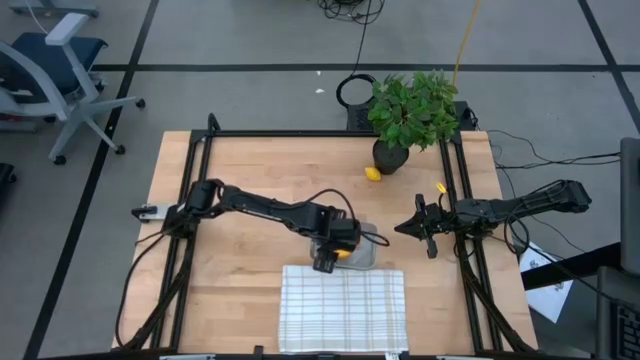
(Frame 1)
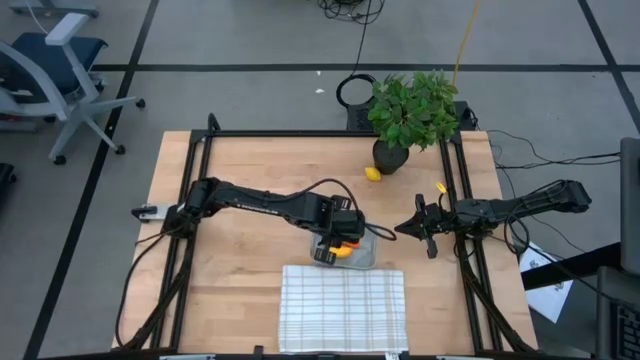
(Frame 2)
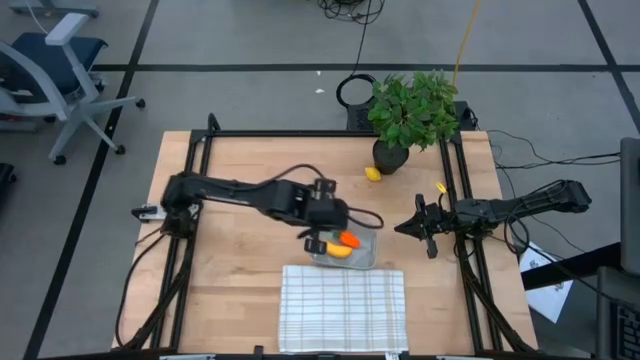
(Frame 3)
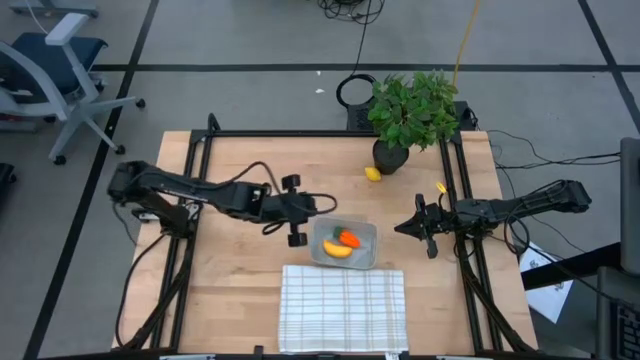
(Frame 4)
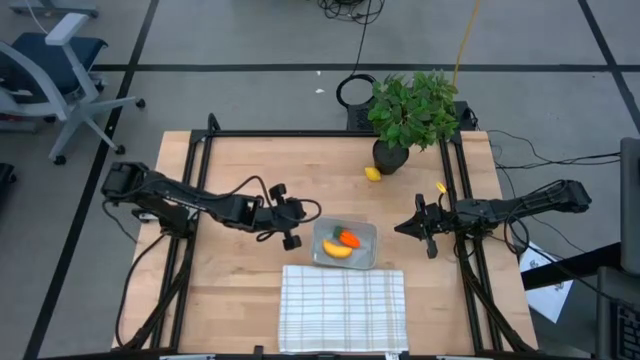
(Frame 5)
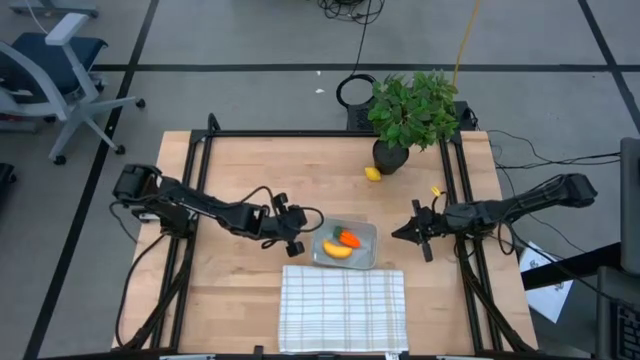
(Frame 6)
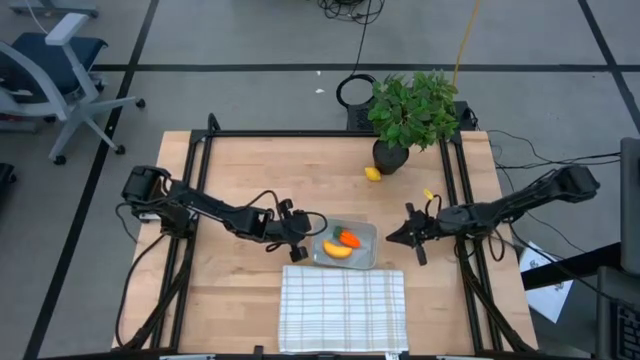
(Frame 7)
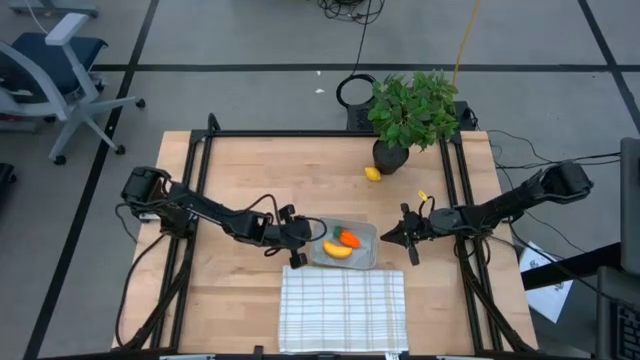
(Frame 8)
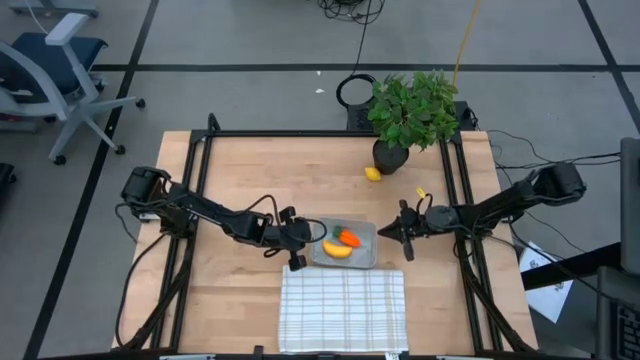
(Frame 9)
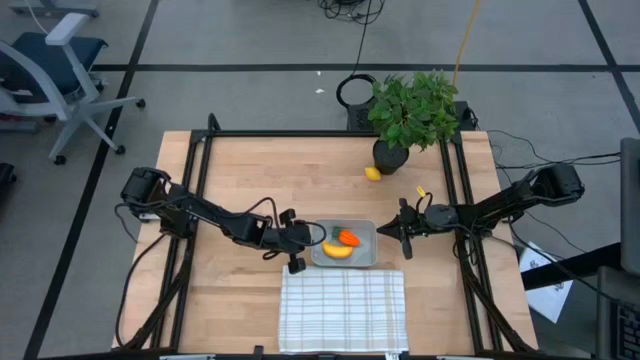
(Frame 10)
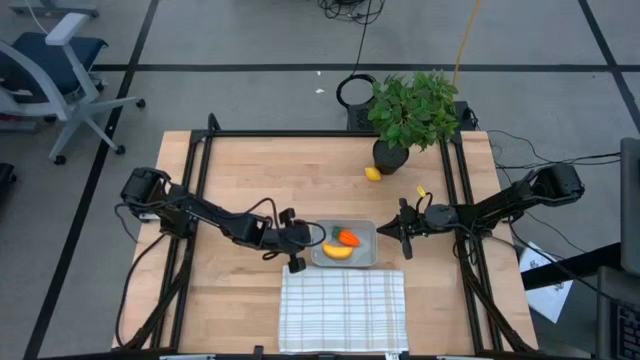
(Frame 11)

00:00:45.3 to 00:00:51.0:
Task: Pick and placing Produce into tupperware
Adjust the gray bin

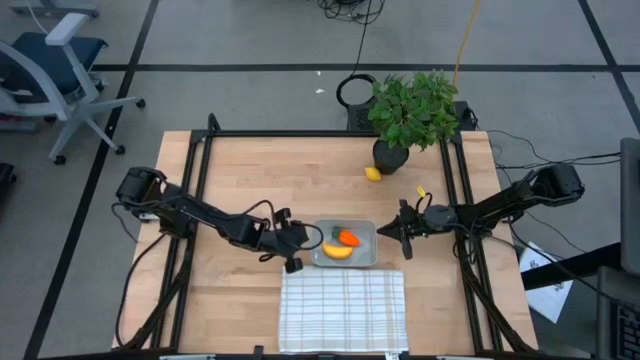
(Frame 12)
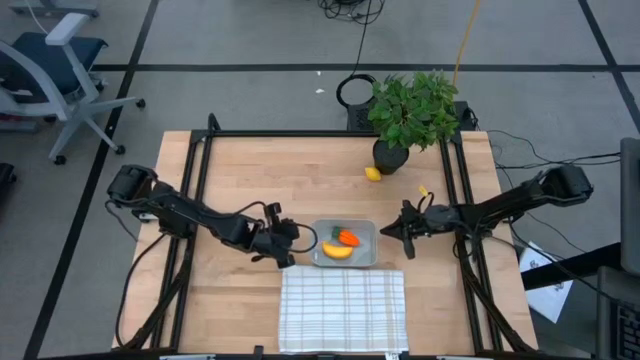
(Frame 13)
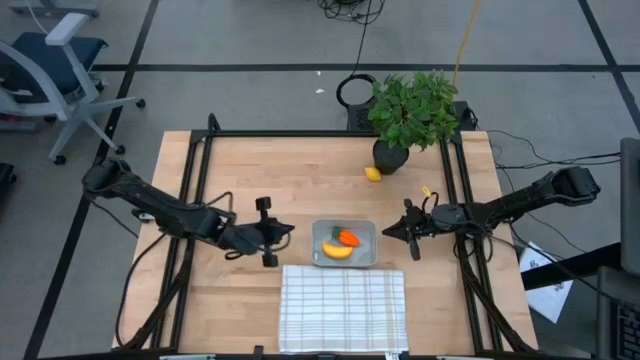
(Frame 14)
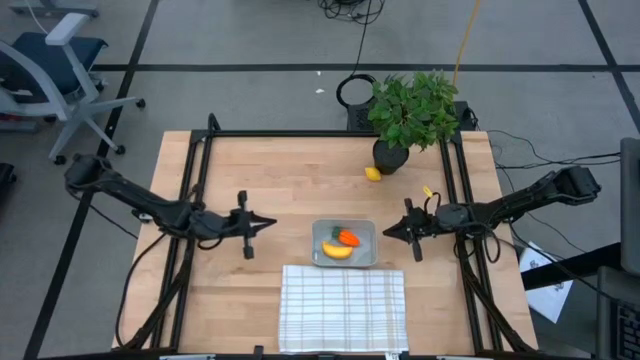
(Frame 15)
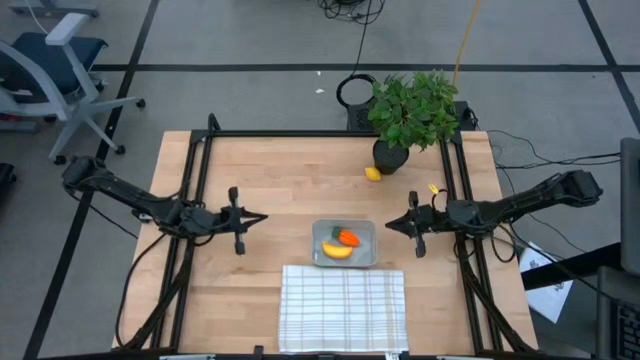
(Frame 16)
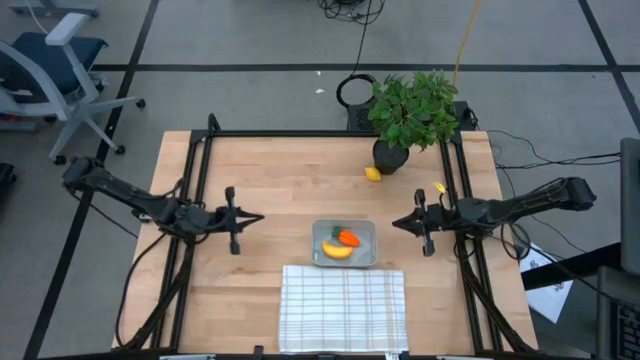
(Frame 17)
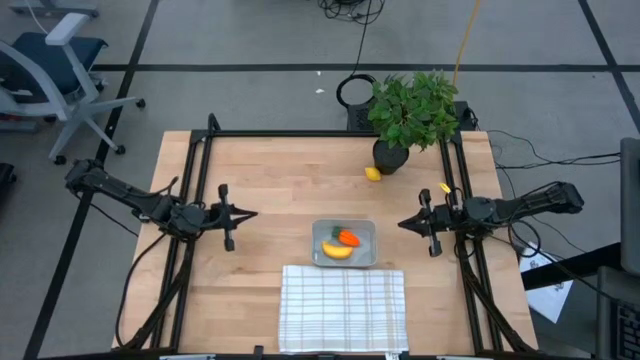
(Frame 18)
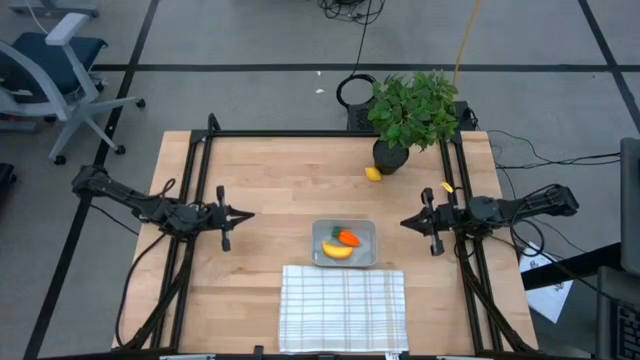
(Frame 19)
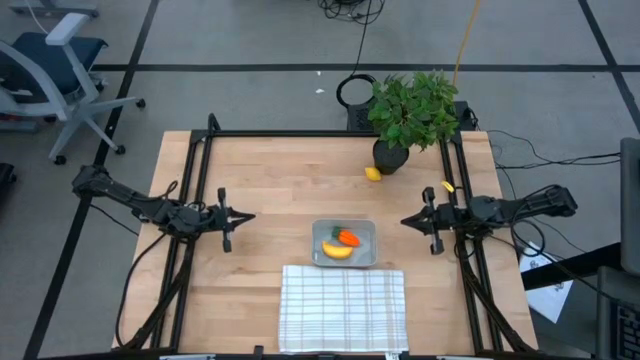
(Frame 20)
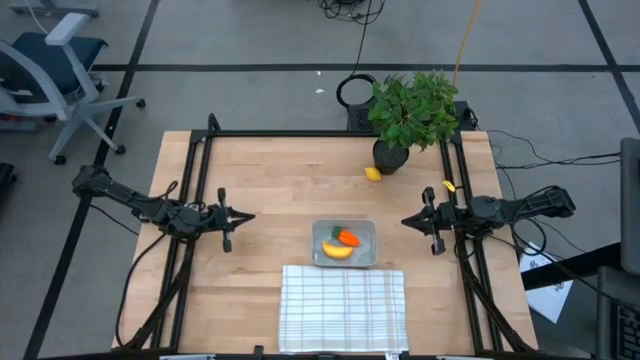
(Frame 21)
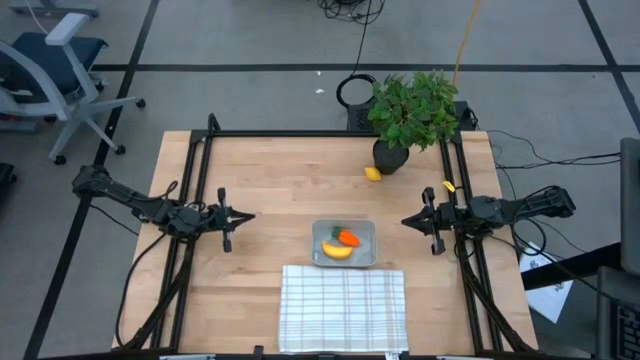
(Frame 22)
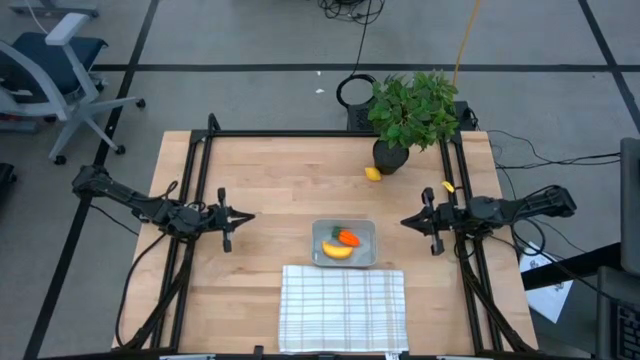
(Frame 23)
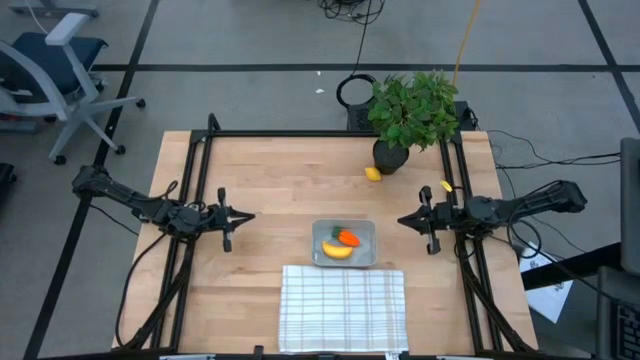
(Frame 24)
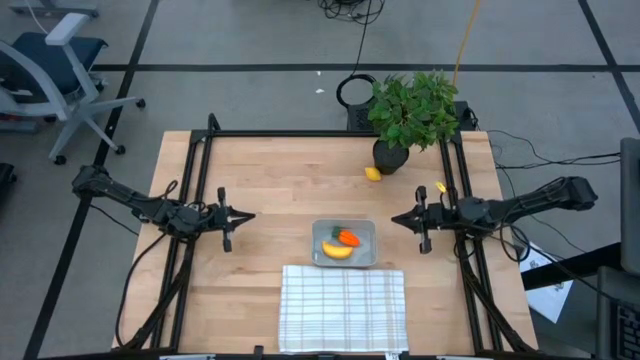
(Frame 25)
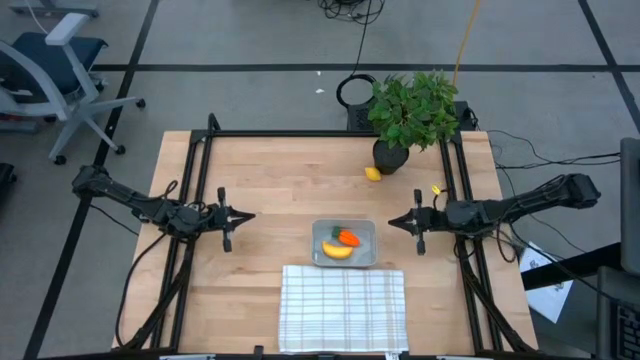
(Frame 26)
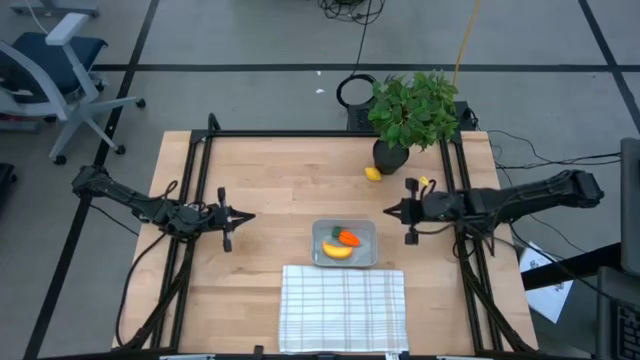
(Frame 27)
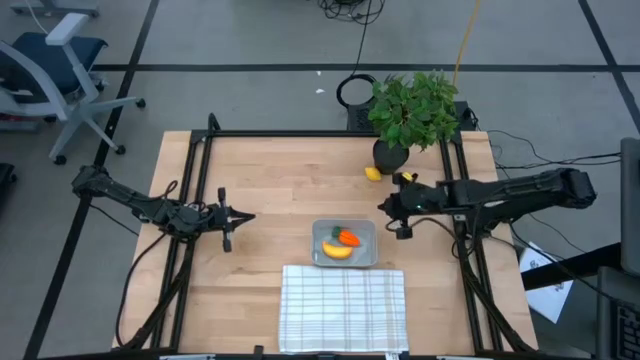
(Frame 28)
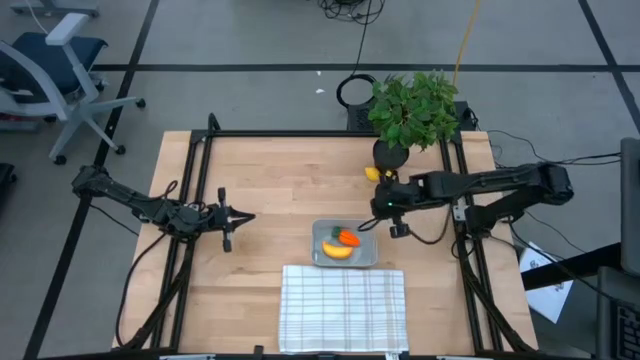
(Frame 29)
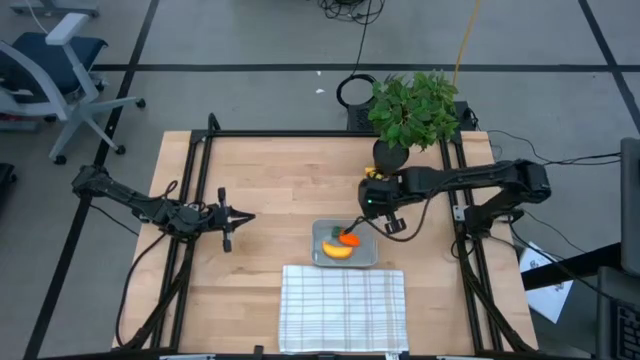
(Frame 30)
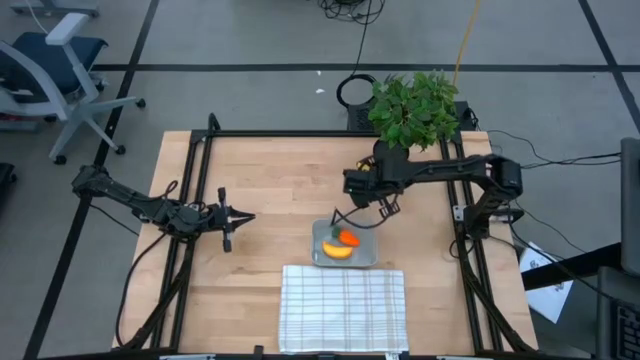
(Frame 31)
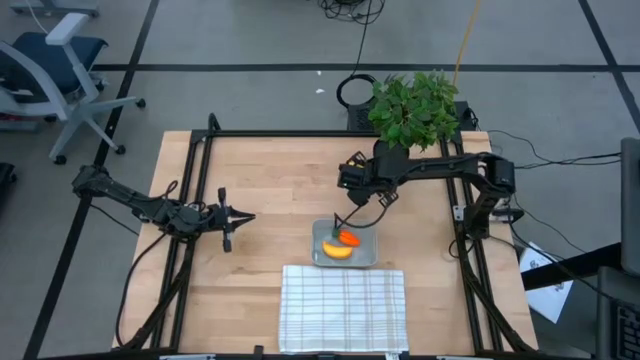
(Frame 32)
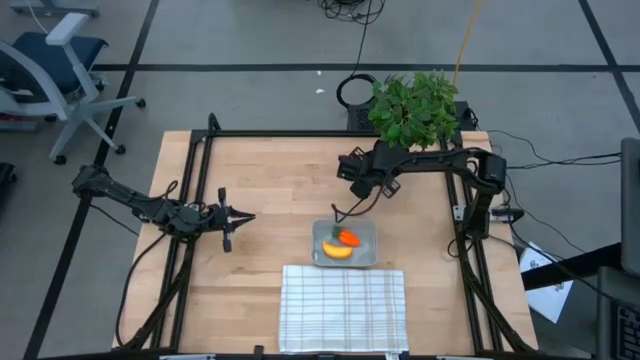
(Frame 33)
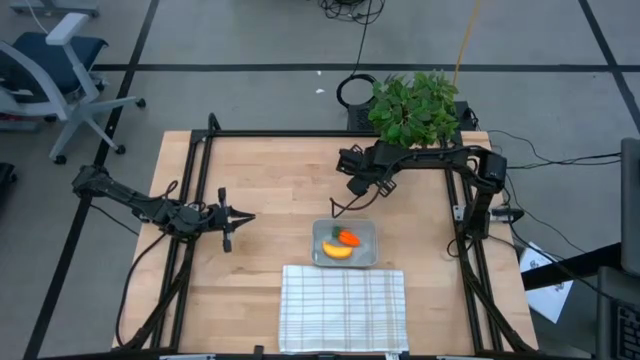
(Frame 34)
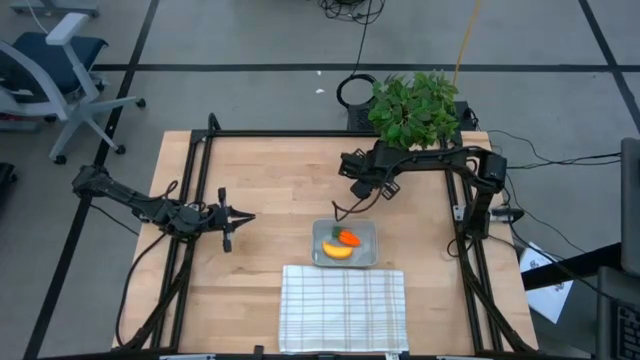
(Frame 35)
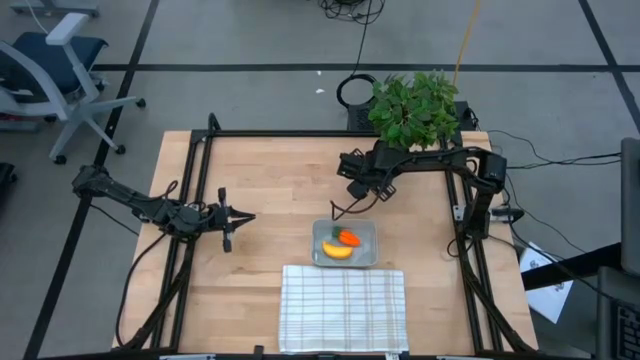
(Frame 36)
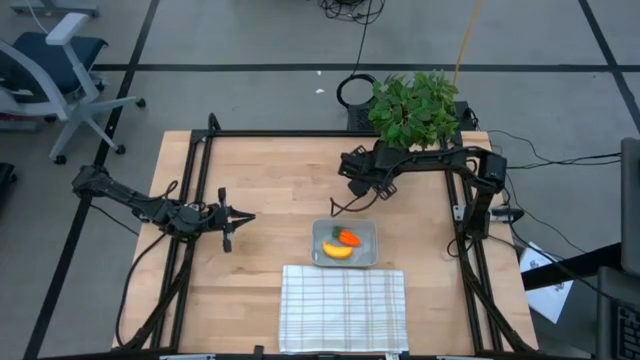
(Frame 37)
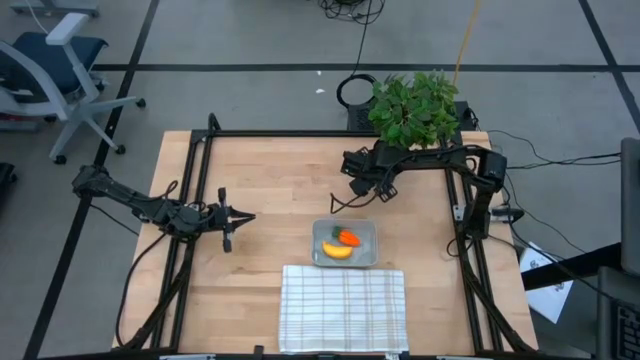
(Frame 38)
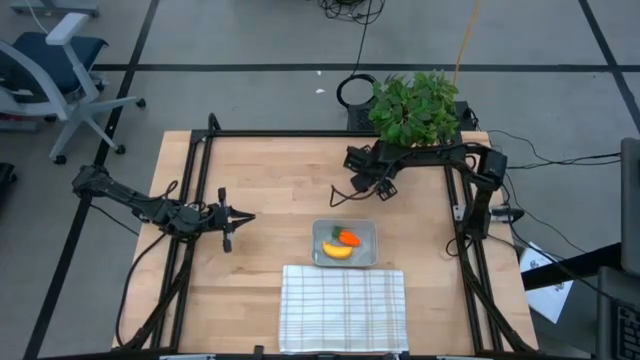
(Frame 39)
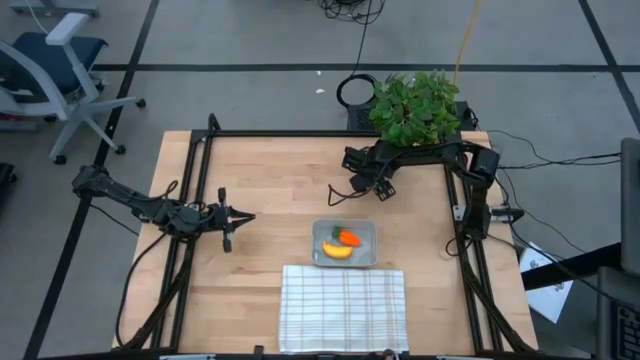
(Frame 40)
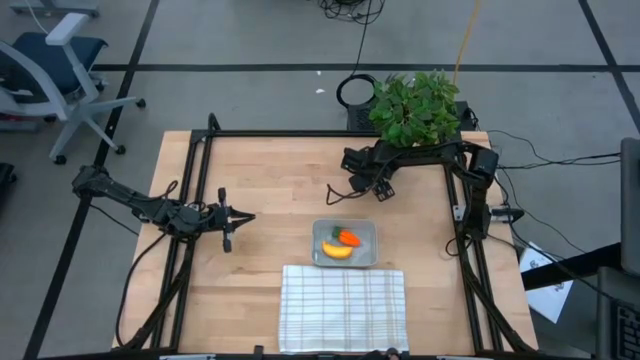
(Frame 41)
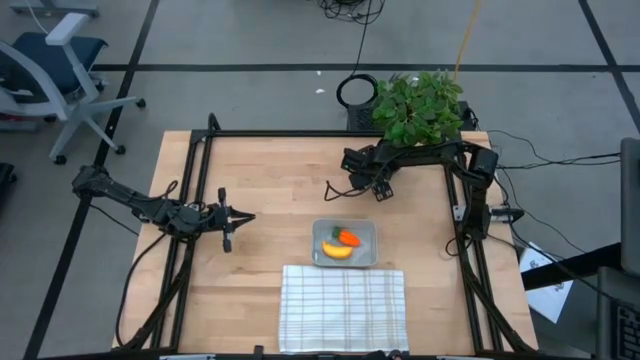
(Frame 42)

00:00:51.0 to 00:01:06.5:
Put the yellow lemon into the gray bin
